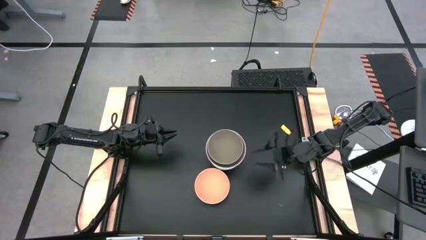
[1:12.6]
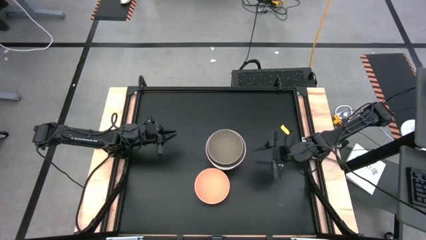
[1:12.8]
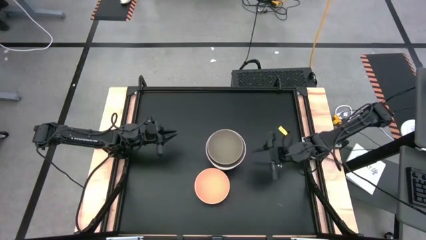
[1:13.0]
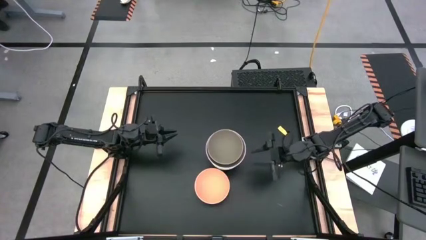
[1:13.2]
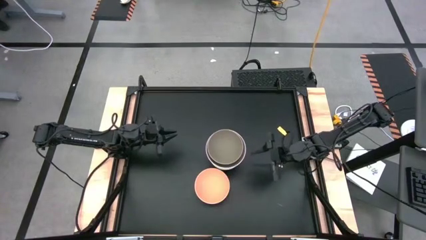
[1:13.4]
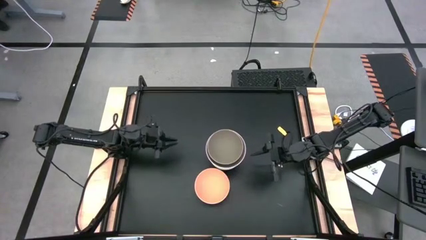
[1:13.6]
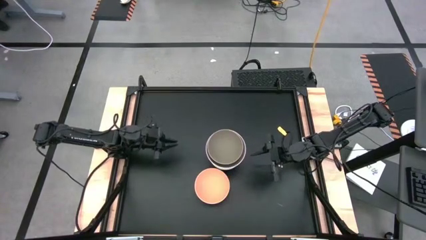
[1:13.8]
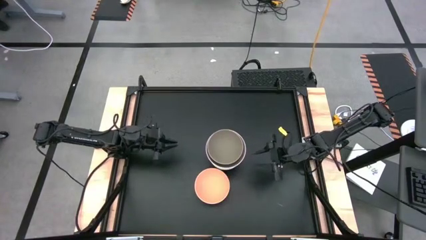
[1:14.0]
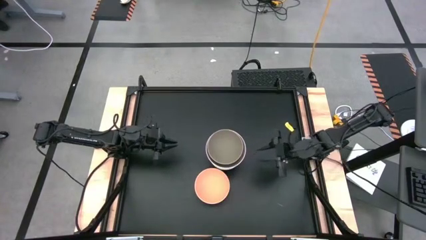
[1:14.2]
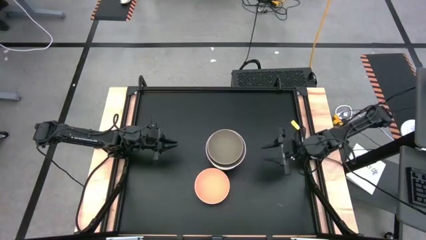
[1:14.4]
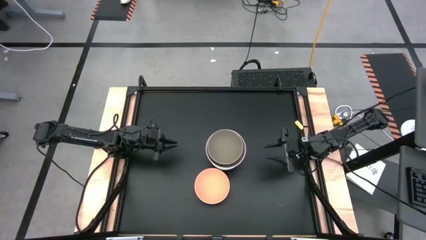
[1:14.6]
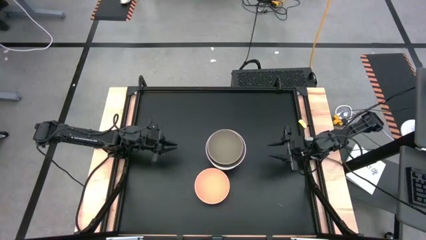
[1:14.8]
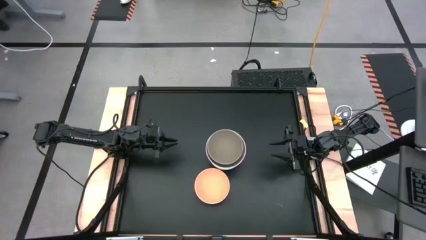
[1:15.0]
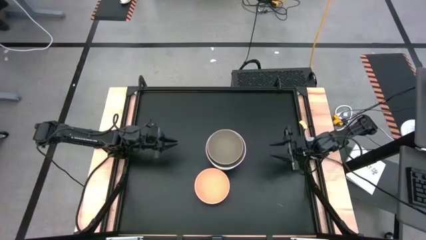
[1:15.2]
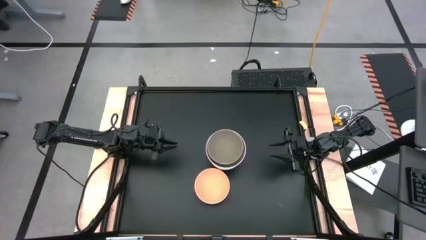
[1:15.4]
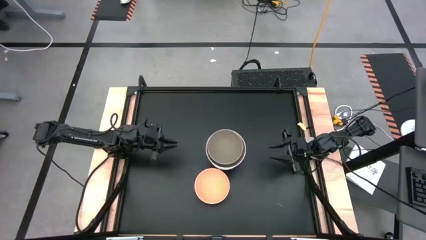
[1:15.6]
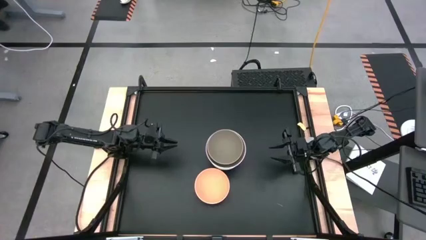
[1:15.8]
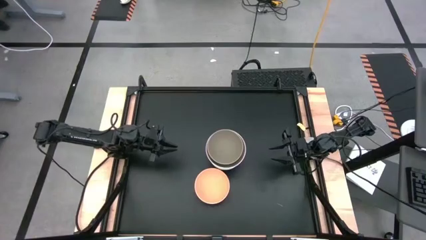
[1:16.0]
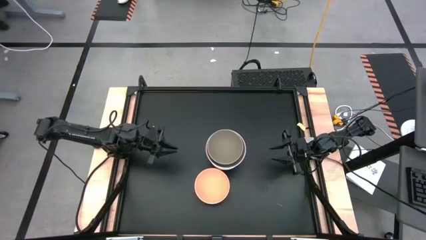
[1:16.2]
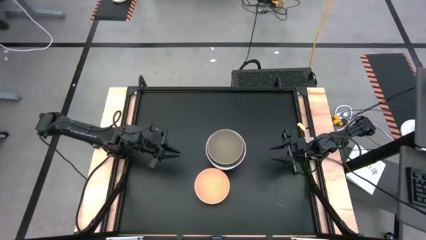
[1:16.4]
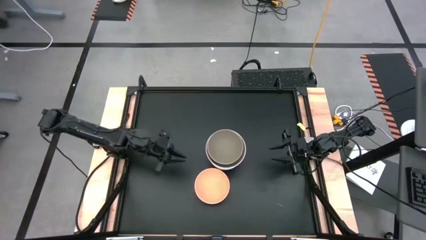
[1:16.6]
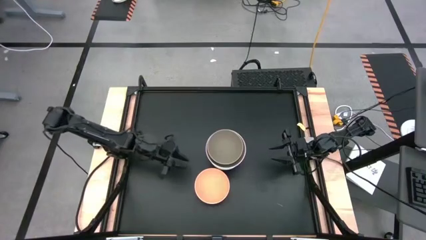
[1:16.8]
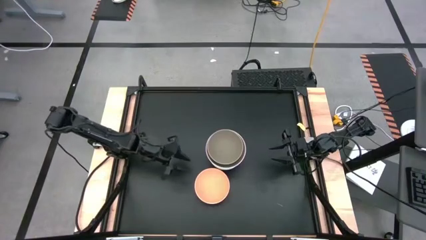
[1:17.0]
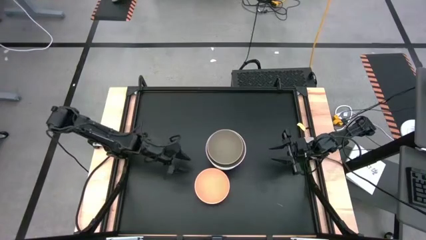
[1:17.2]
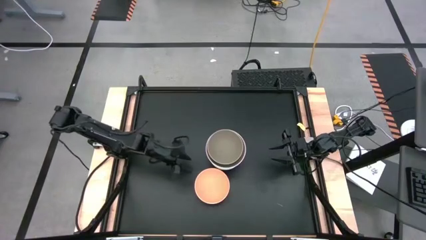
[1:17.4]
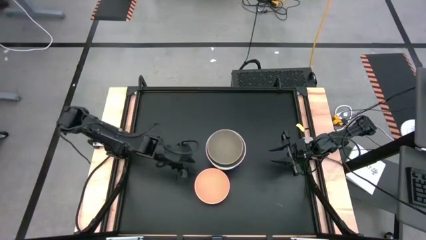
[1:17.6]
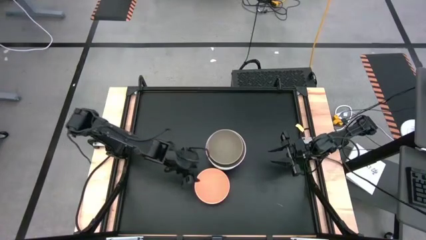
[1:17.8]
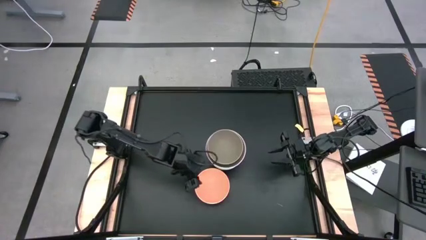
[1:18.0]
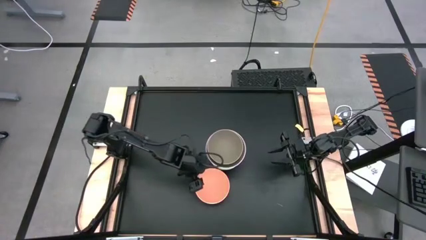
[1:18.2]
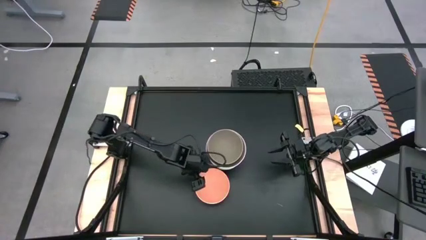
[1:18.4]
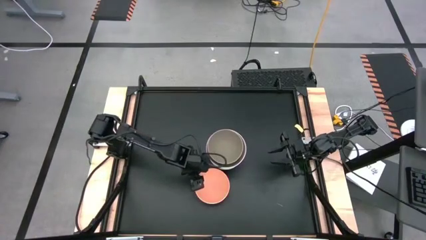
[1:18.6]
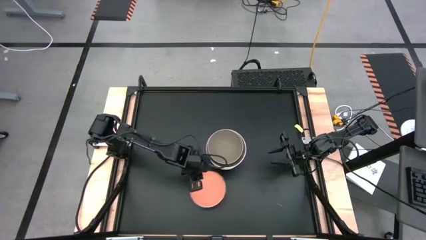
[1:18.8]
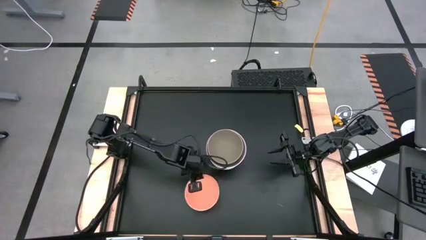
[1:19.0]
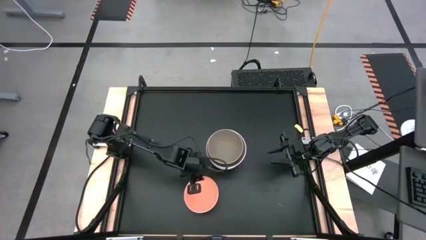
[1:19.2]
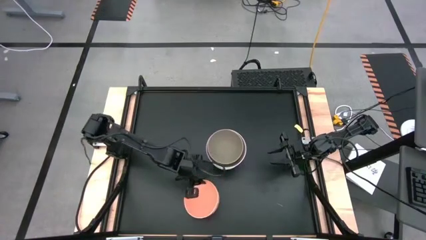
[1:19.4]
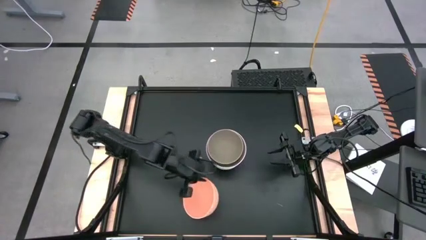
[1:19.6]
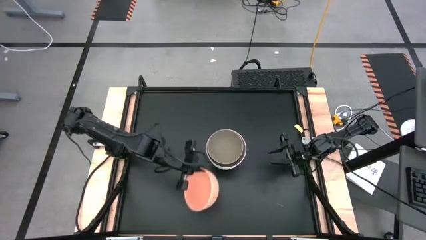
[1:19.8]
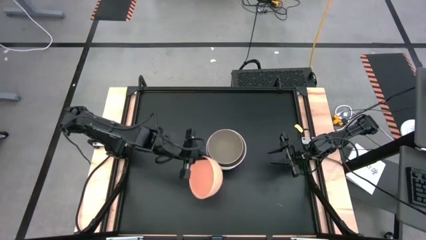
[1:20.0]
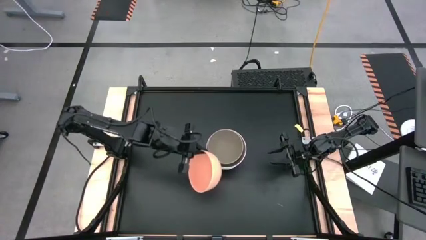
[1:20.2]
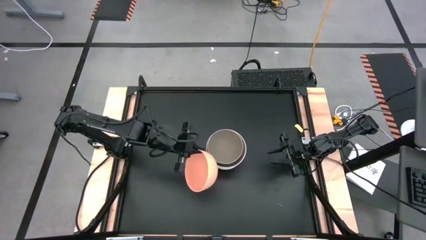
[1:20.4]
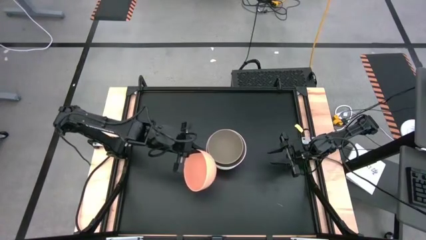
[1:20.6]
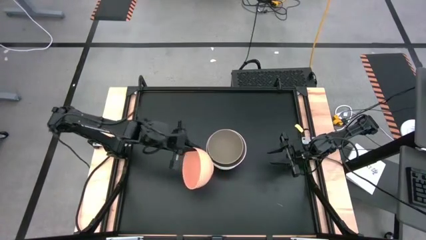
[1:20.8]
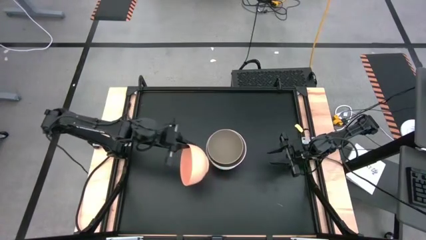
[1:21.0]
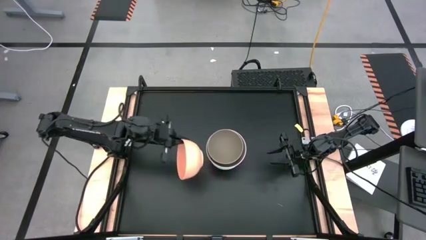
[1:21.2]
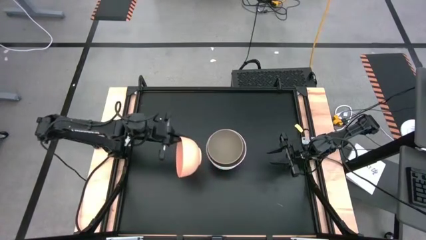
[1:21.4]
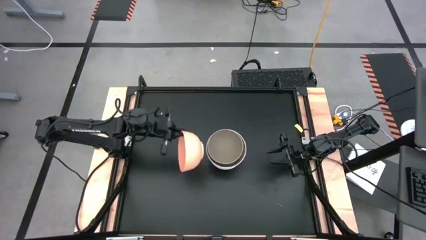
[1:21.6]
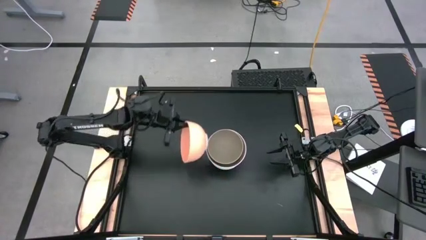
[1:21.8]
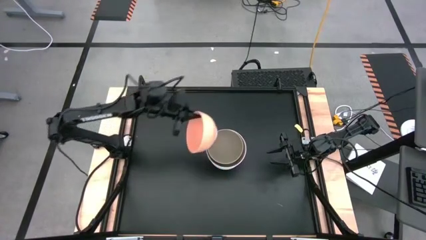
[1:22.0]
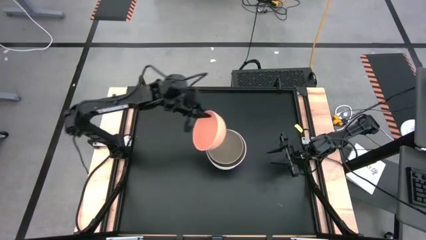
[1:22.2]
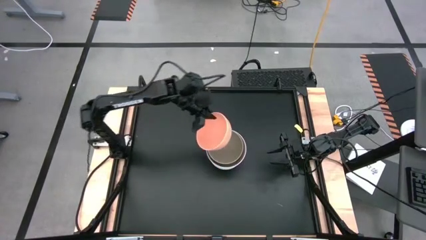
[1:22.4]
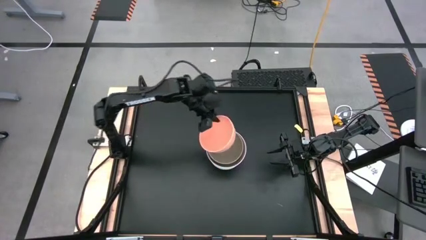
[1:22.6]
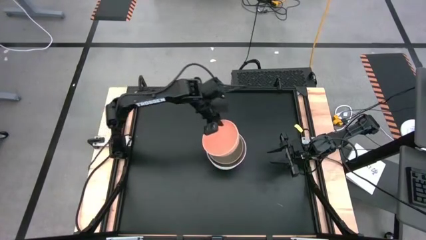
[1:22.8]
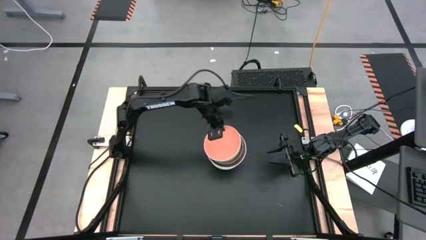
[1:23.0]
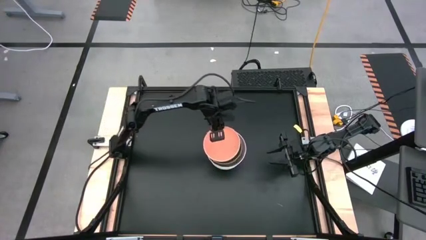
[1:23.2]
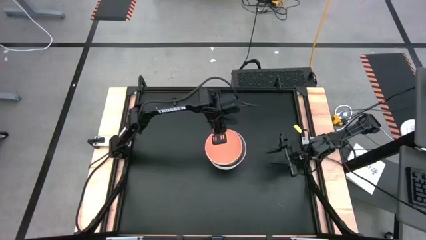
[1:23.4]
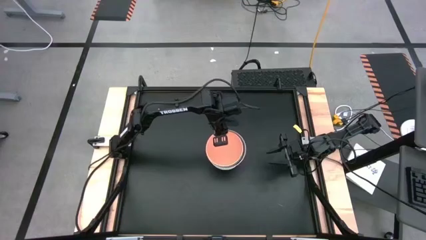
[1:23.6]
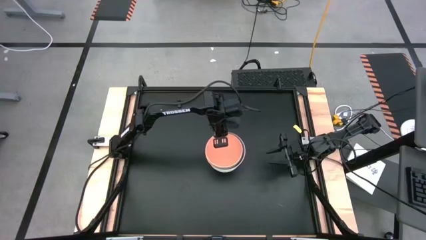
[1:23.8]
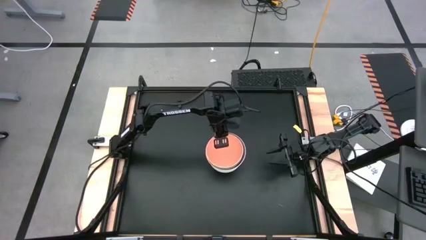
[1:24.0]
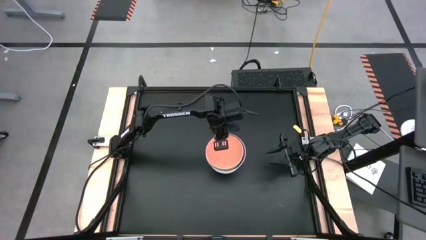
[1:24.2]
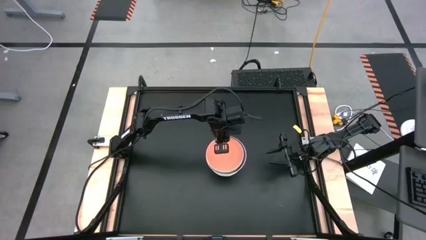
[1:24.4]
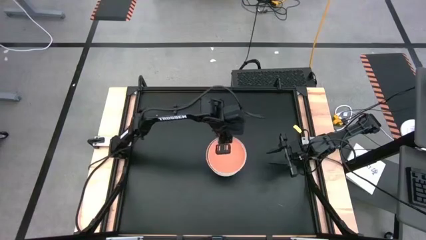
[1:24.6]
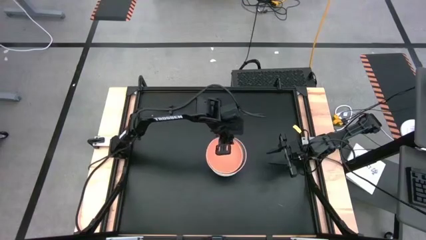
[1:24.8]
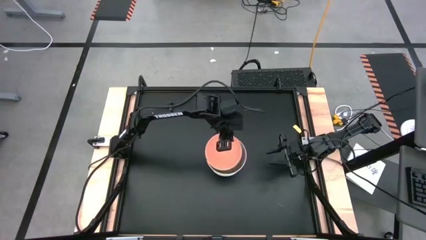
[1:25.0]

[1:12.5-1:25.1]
Task: Nest bowls inside each other
Stack the light orange bowl on the light gray bowl

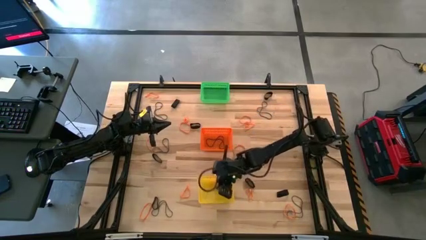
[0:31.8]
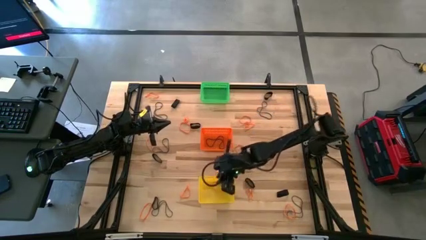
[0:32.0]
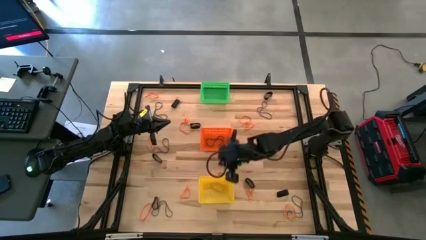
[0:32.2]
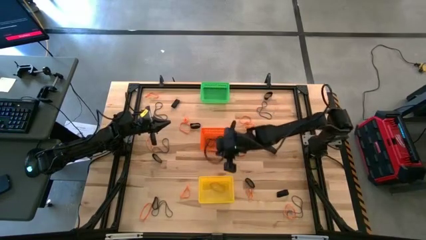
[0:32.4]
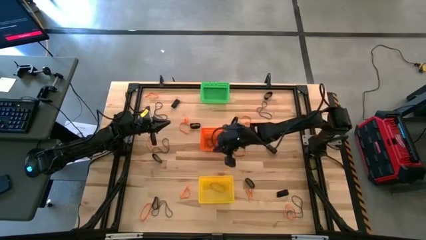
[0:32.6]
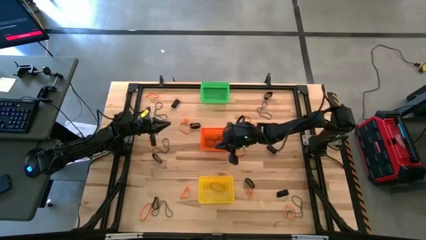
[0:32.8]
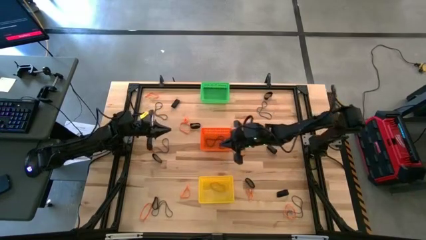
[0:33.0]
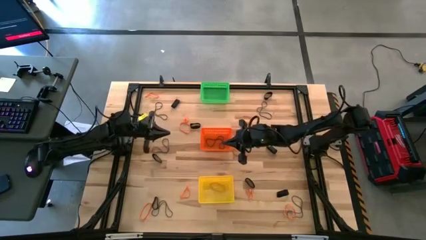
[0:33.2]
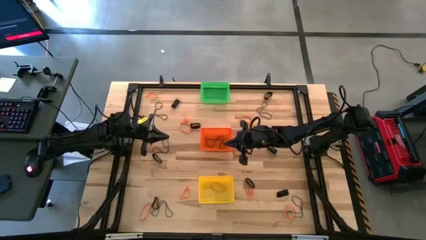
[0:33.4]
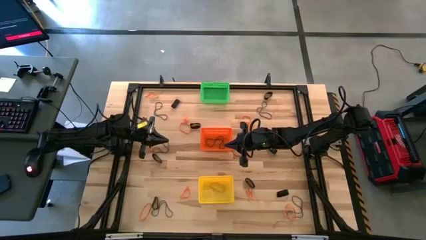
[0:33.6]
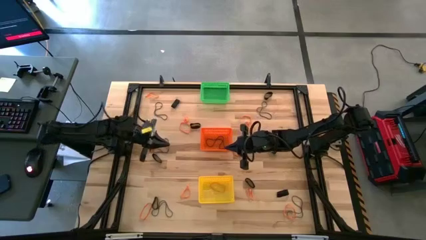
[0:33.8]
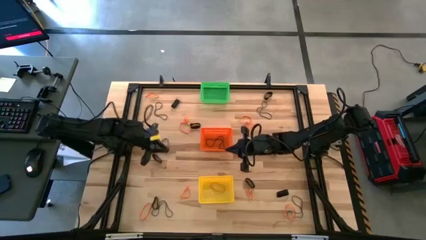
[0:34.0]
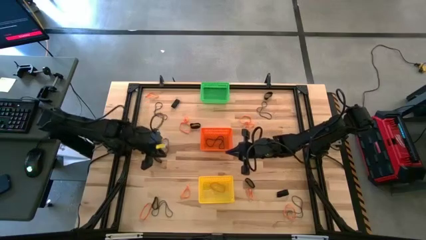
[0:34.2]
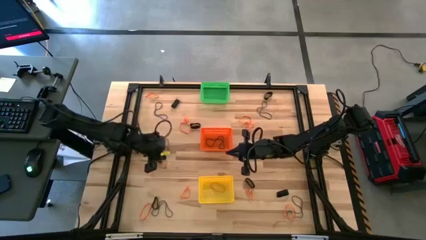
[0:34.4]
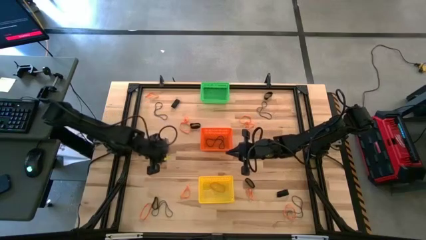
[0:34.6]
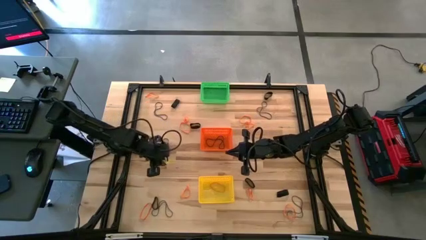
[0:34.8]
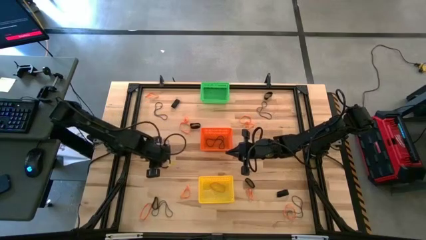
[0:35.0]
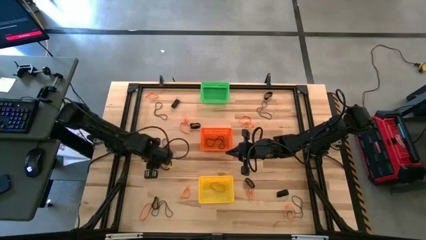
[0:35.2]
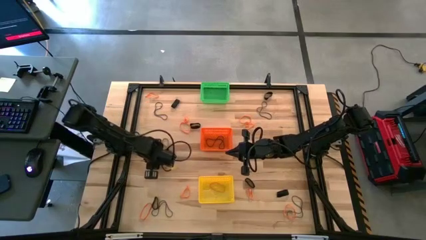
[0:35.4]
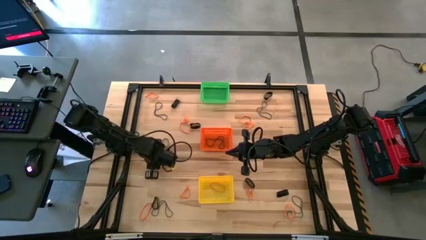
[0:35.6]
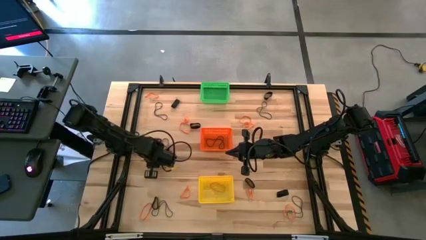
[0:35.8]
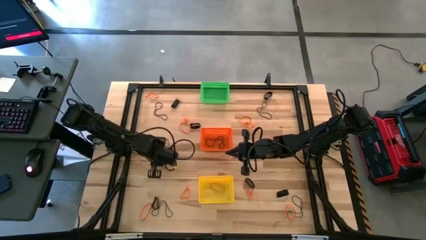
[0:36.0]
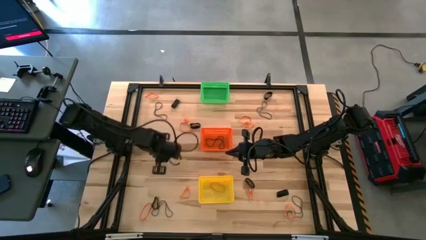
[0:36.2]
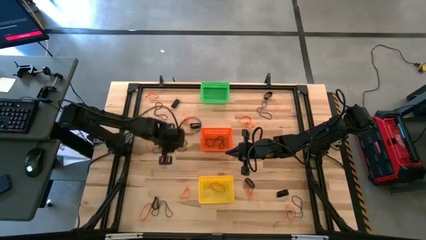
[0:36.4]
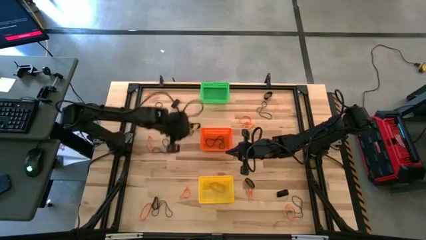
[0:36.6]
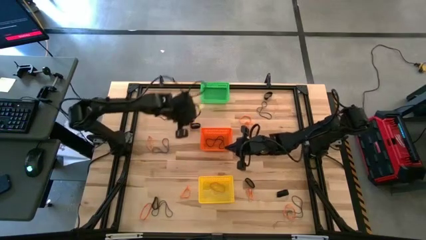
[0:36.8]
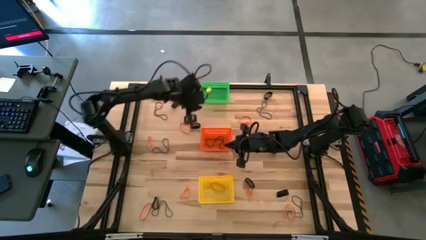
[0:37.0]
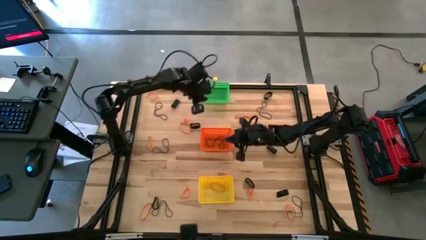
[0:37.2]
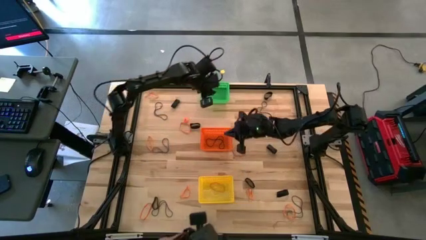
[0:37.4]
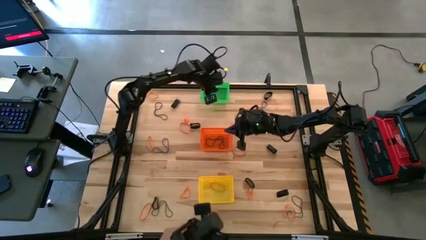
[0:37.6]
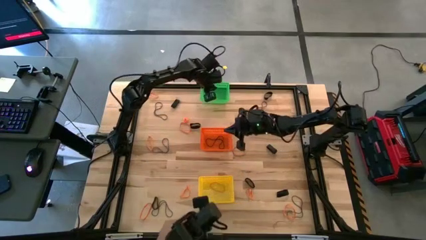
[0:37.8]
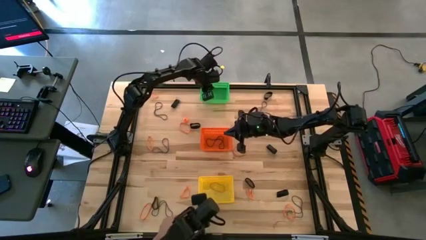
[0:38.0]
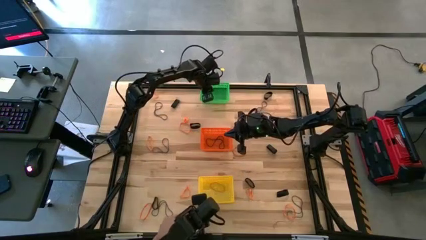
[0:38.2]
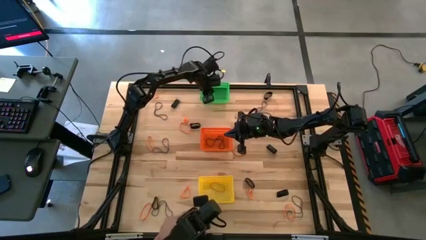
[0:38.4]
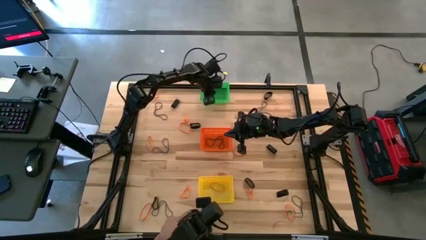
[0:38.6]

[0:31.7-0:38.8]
Task: Sort rubber bands into baskets
Put the black rubber band into the green bin
